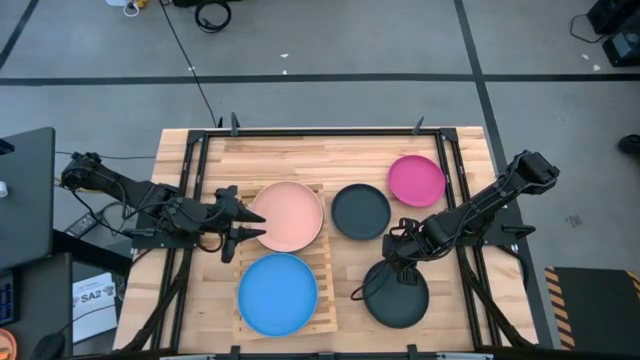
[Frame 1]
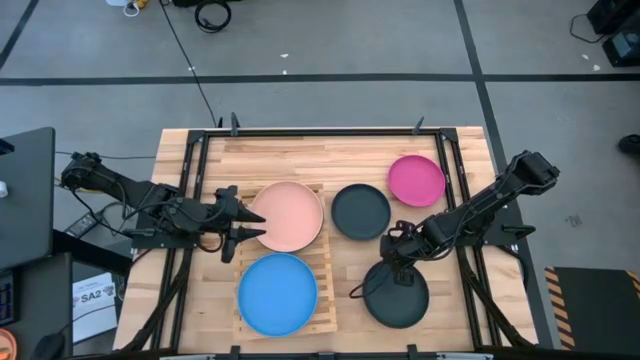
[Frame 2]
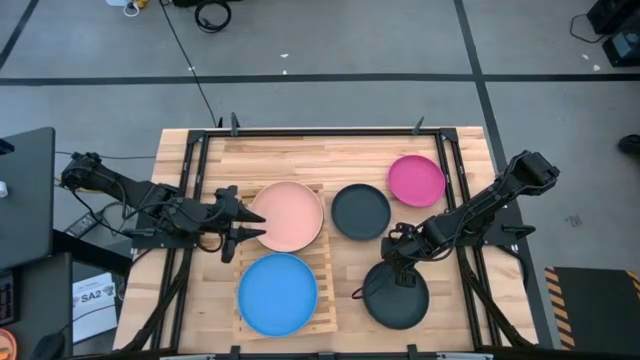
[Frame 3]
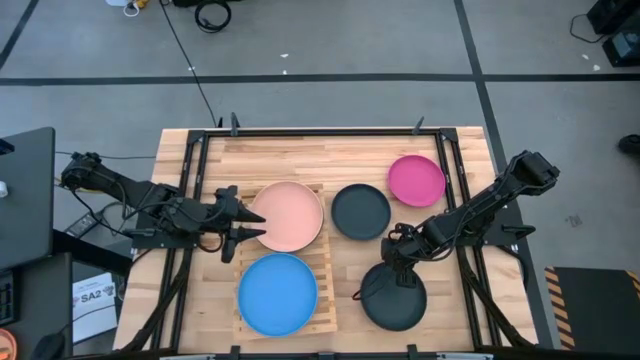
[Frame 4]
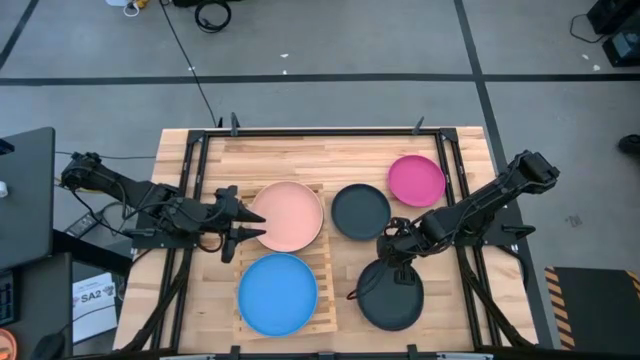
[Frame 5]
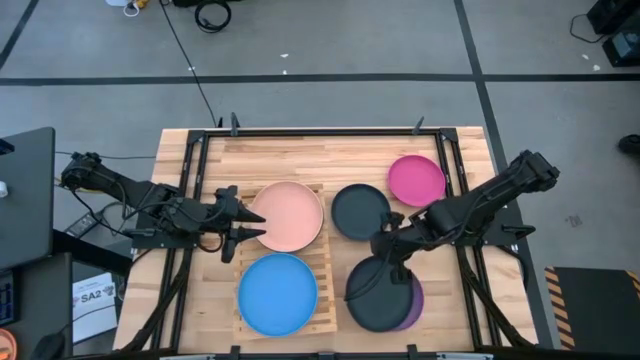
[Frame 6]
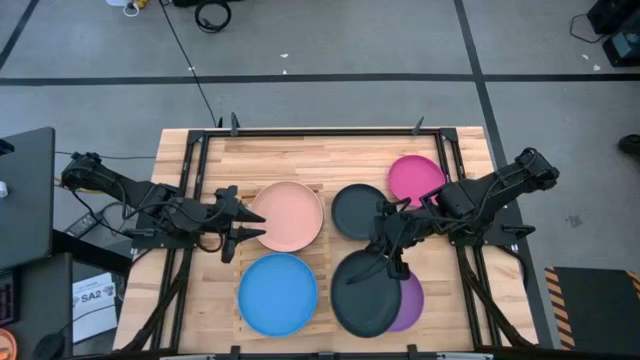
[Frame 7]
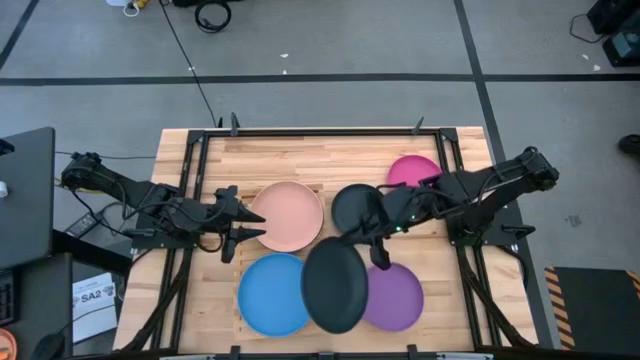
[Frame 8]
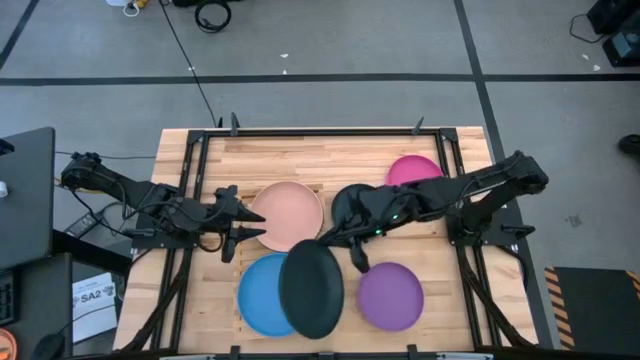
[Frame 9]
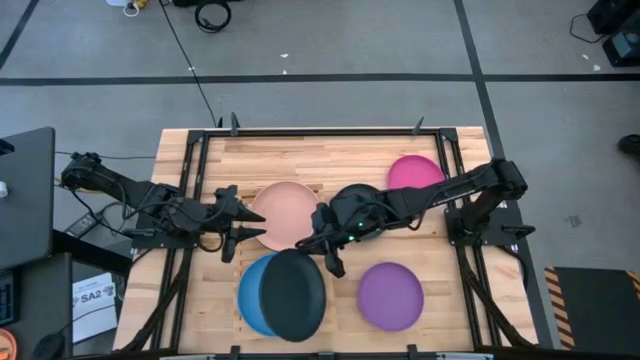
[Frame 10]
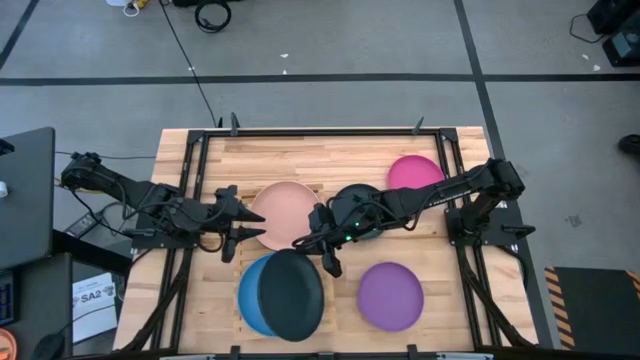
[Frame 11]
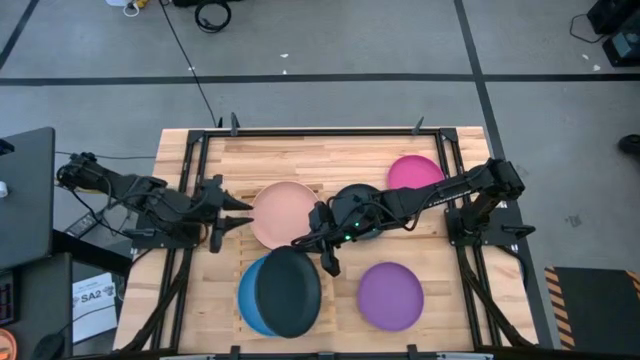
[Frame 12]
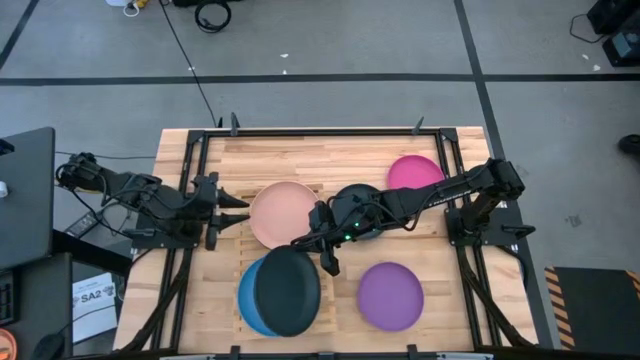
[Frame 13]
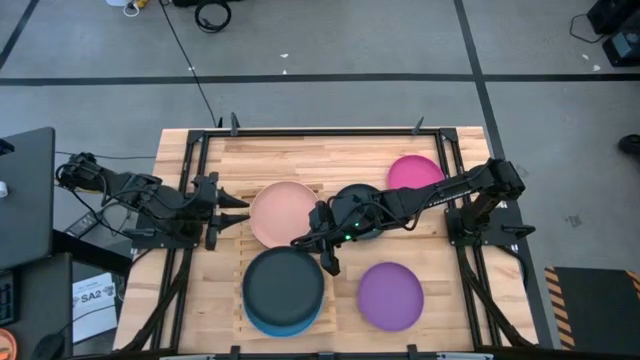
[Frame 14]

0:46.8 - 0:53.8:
Task: Place and stack plates onto a shelf
Stack the bottom black plate on top of the blue plate on the shelf

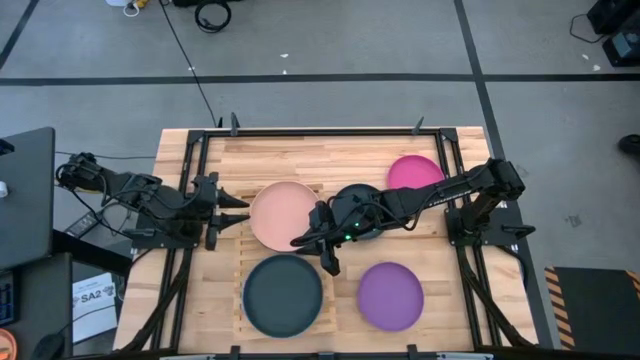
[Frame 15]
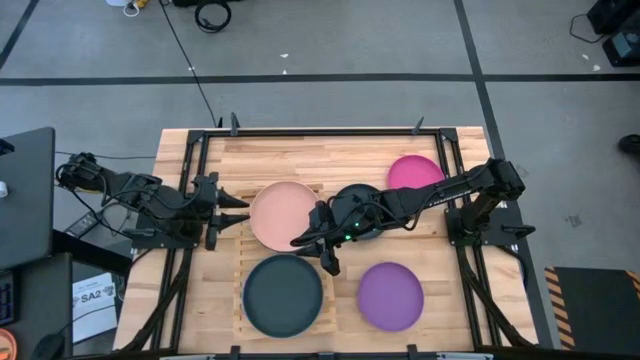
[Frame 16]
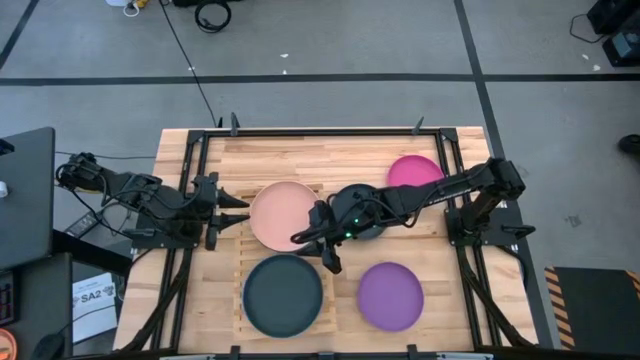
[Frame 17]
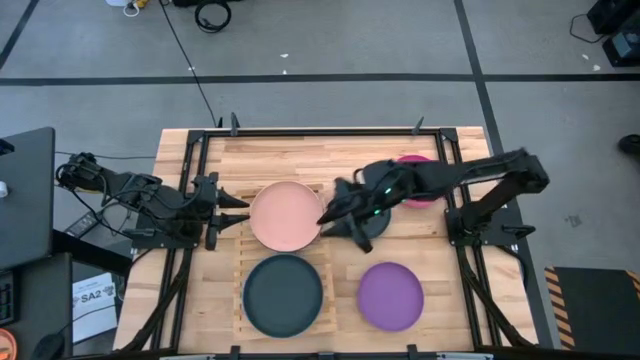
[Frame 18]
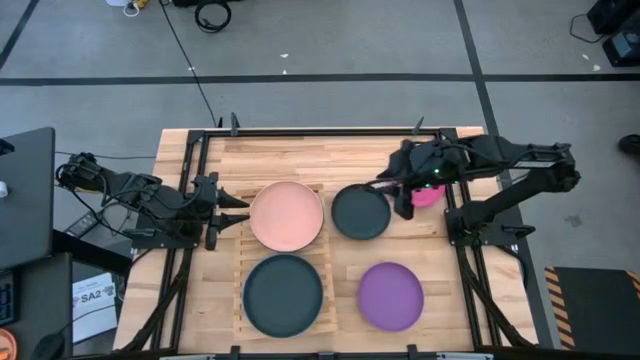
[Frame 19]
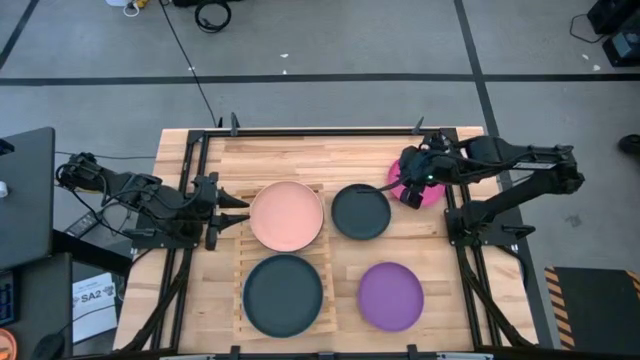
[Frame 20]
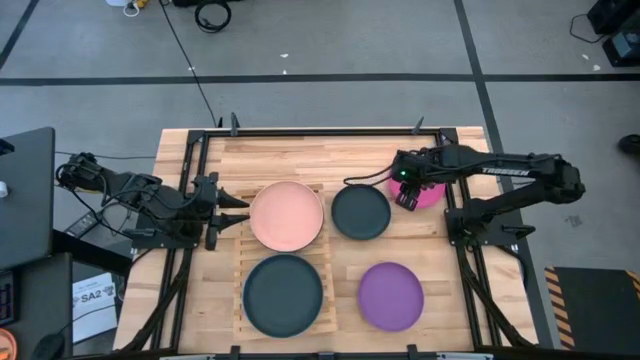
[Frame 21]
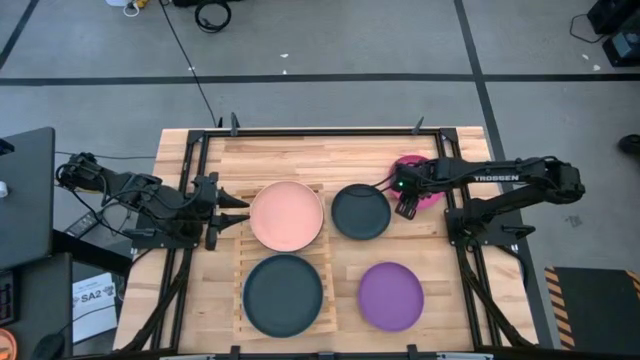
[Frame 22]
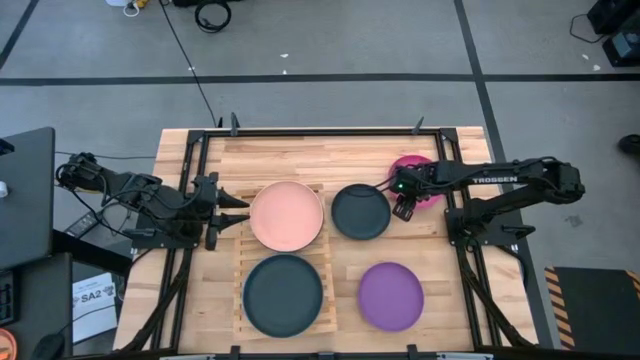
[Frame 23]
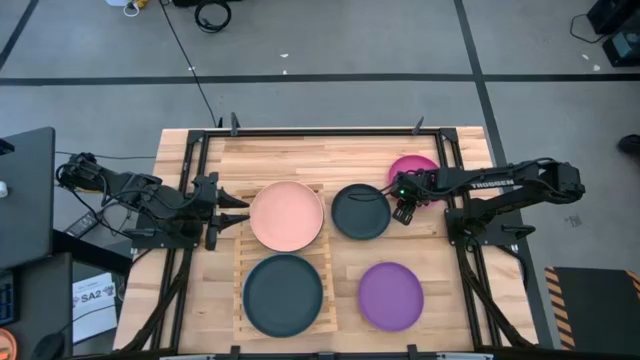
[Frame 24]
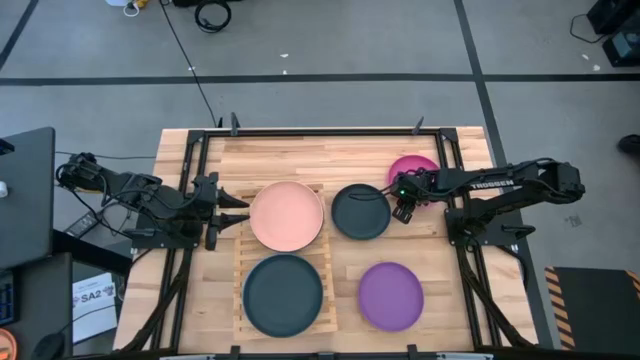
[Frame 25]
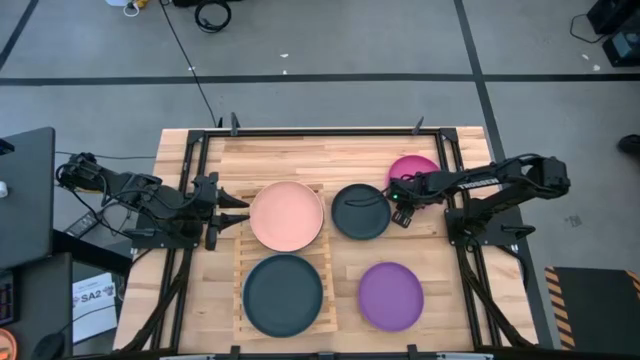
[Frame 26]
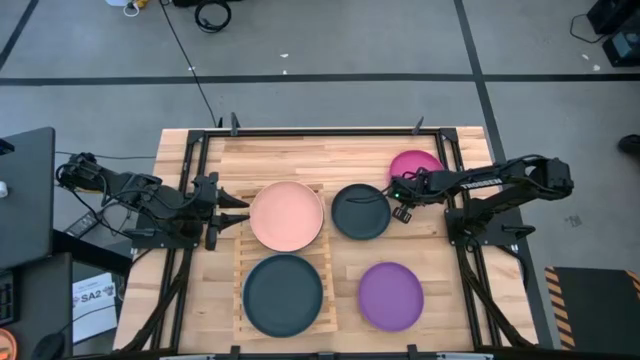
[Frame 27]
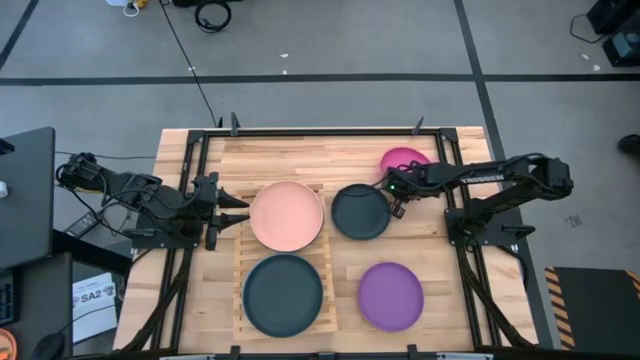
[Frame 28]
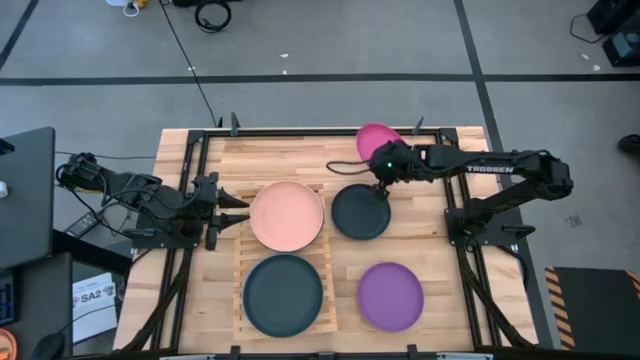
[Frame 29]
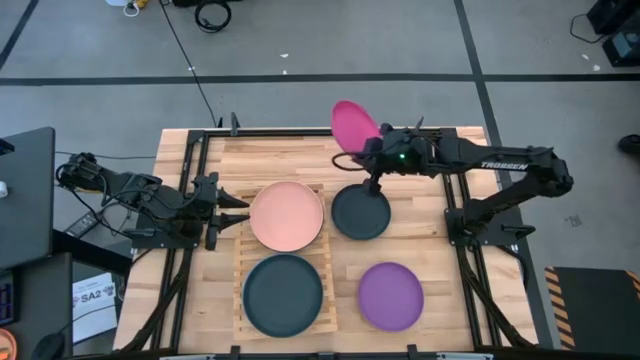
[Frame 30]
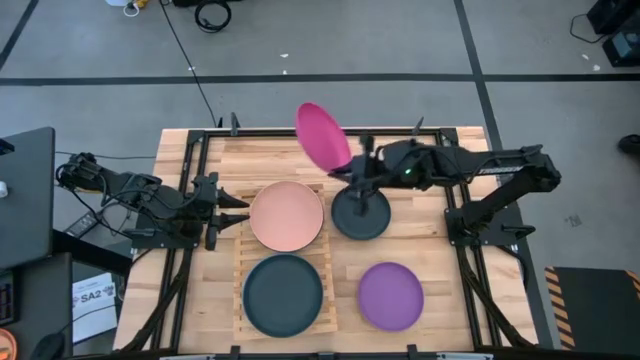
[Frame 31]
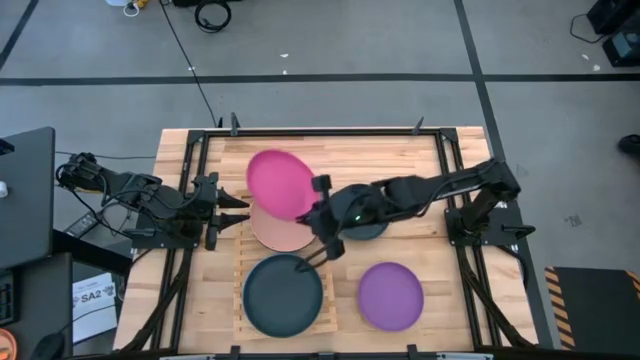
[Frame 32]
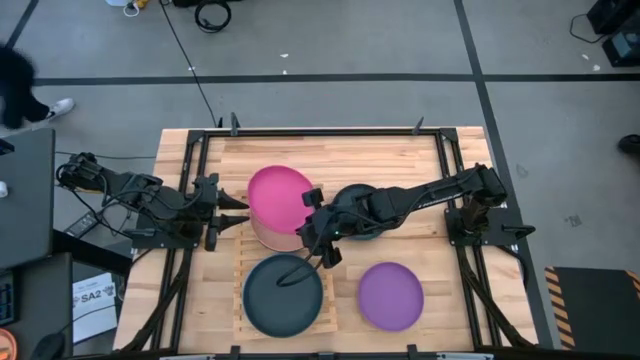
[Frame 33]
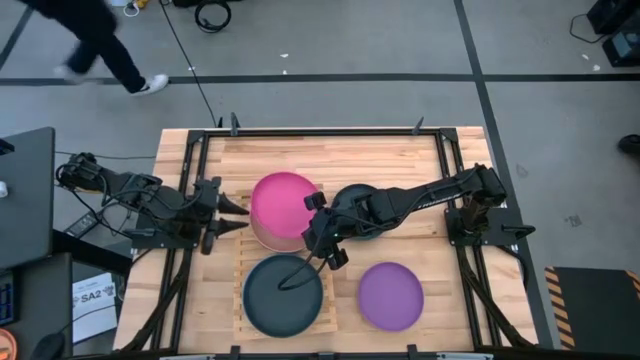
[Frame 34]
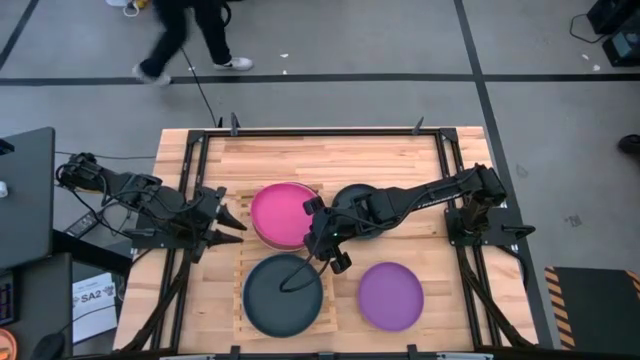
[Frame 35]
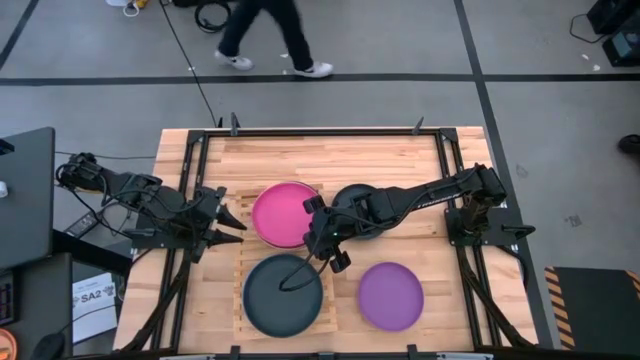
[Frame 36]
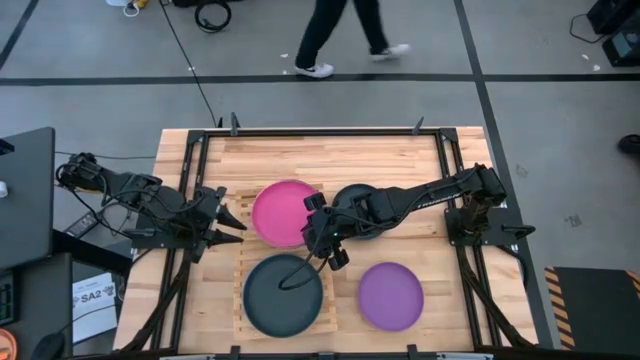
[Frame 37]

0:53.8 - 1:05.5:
Stack the pink plate on top of the brown plate on the shelf

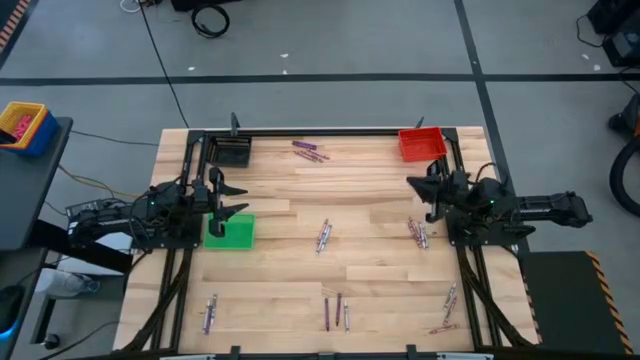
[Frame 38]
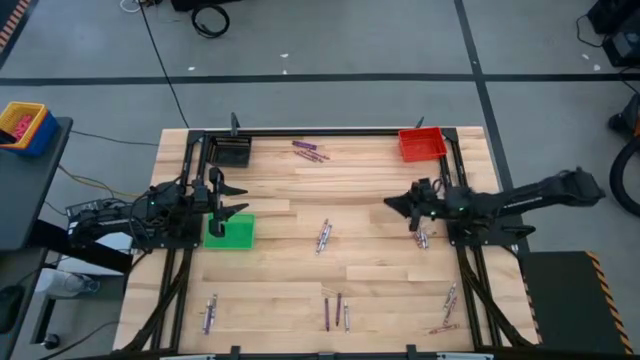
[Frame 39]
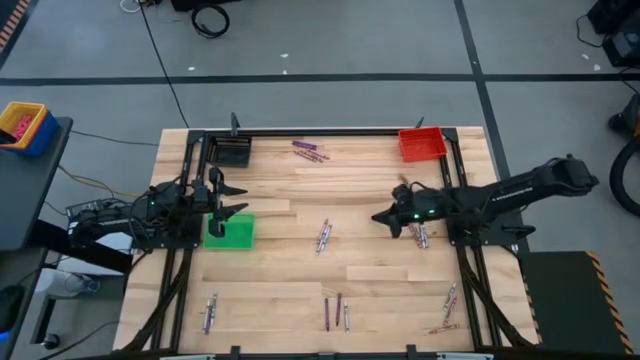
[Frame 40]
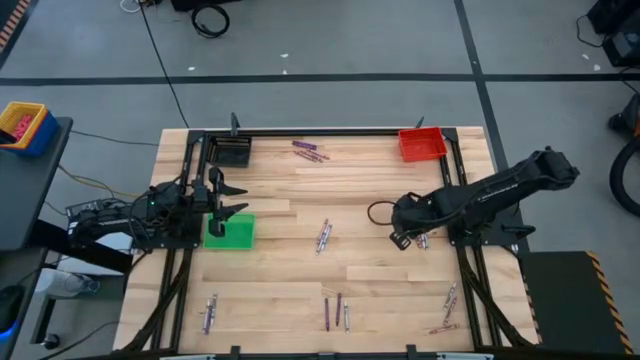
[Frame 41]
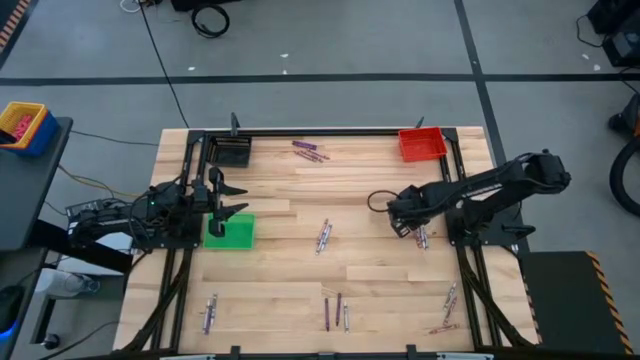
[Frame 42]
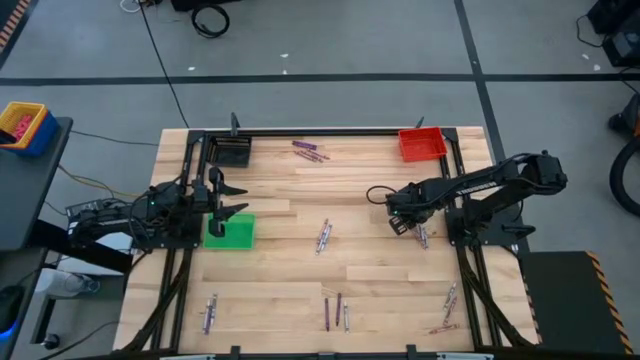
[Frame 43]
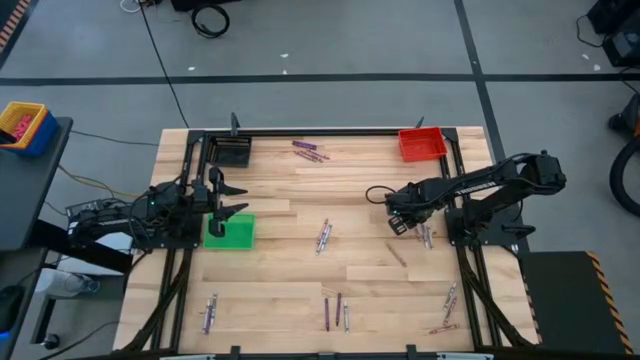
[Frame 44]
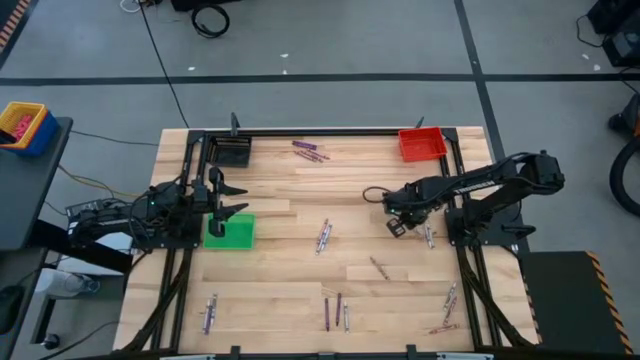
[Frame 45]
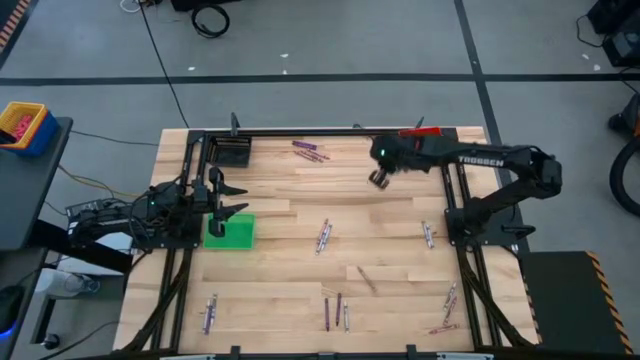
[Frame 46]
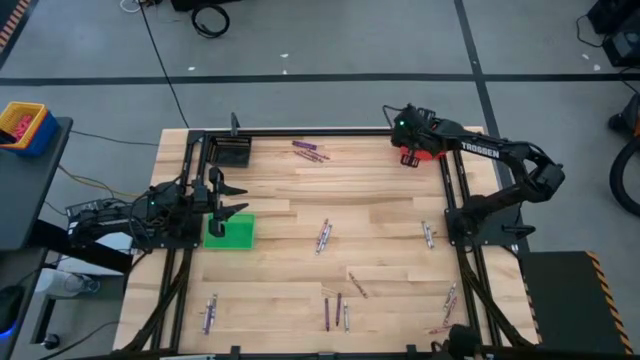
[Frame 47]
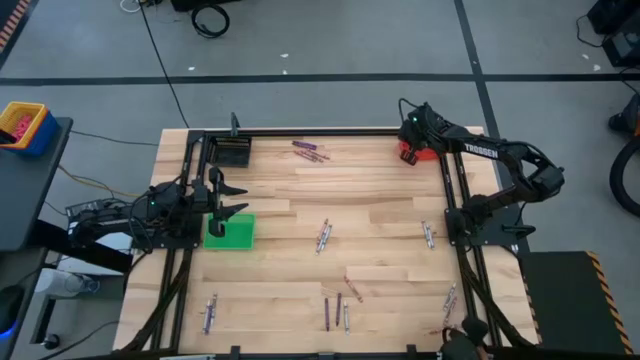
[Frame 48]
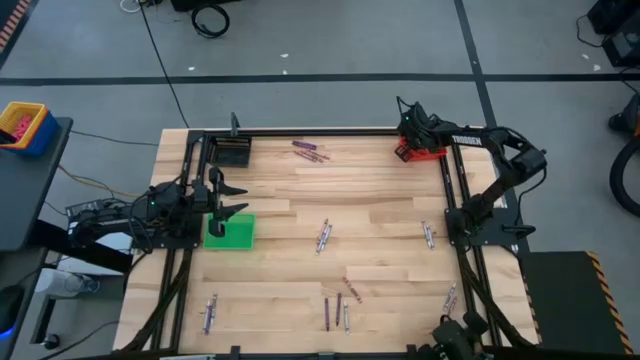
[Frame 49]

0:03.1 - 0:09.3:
Task: Sort crayons
Put the pink crayon into the red bin
